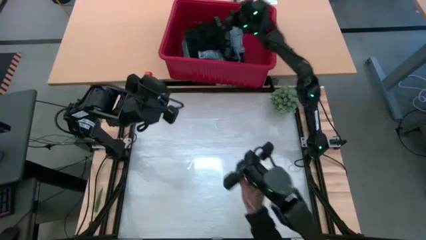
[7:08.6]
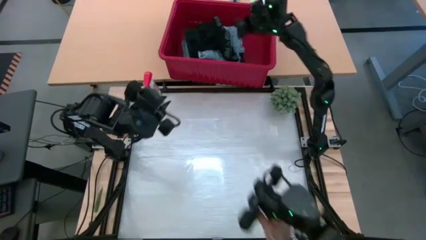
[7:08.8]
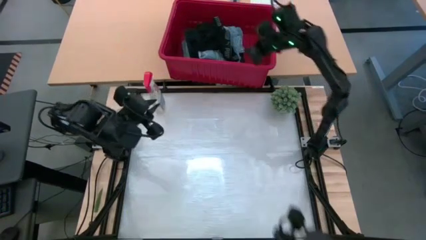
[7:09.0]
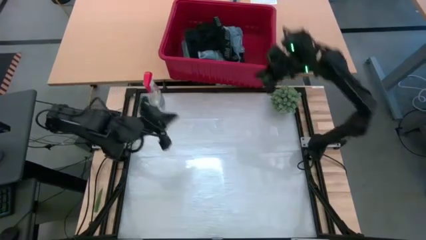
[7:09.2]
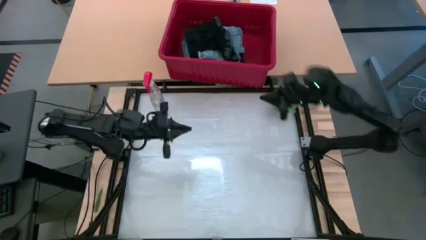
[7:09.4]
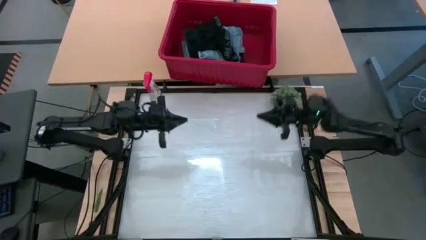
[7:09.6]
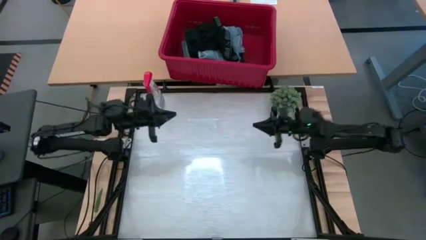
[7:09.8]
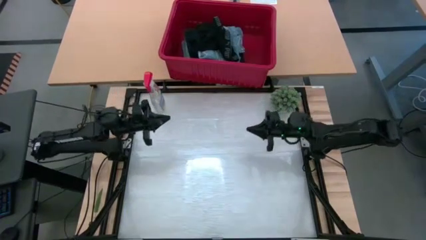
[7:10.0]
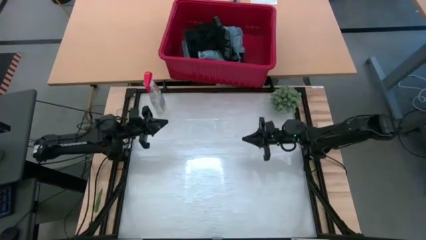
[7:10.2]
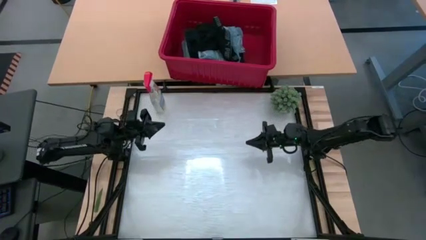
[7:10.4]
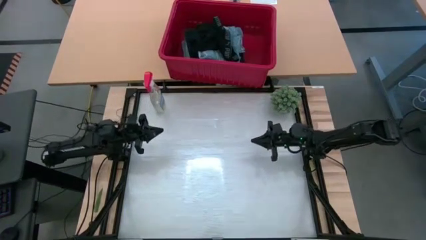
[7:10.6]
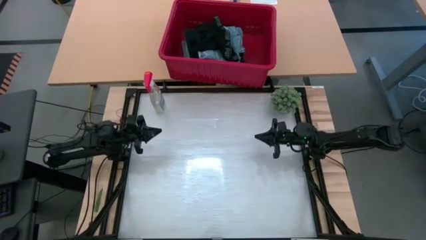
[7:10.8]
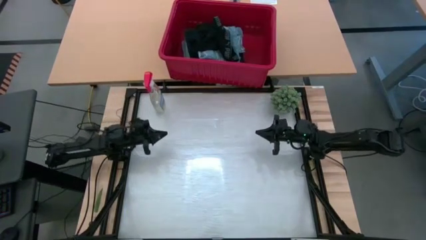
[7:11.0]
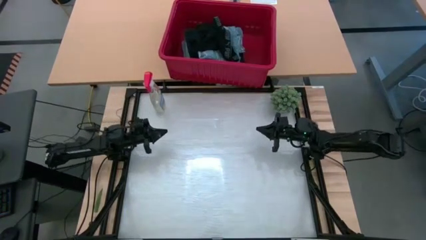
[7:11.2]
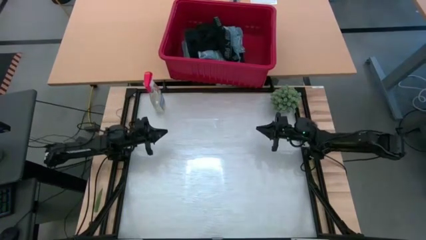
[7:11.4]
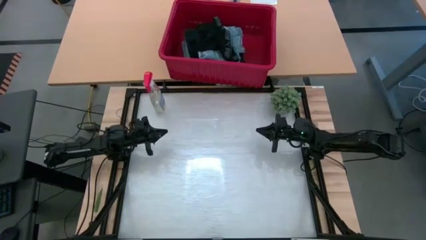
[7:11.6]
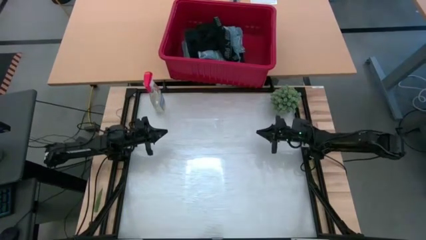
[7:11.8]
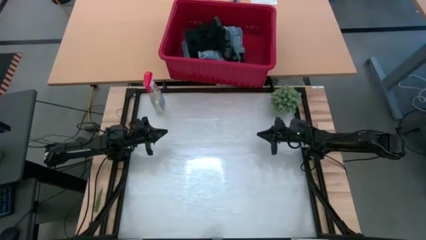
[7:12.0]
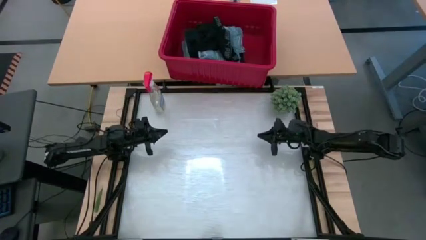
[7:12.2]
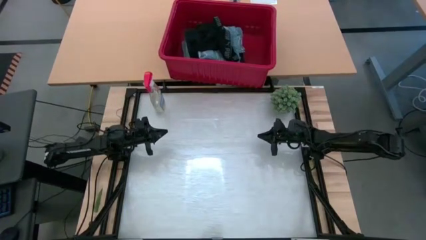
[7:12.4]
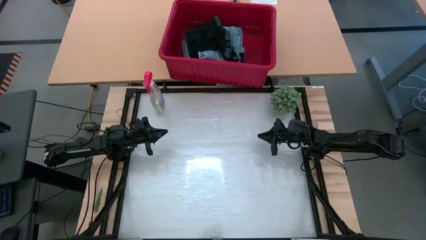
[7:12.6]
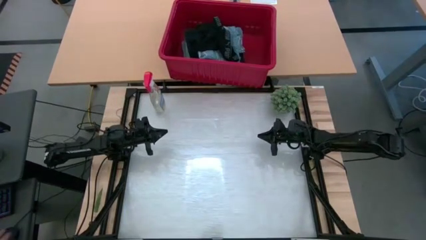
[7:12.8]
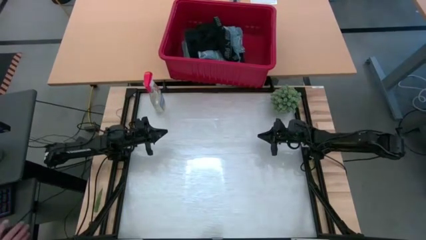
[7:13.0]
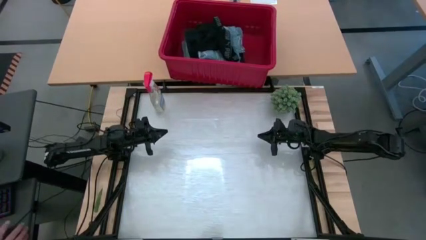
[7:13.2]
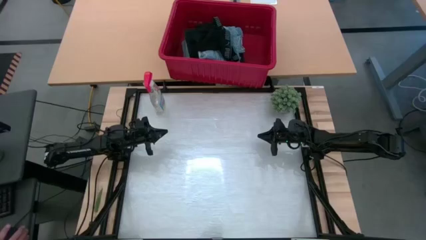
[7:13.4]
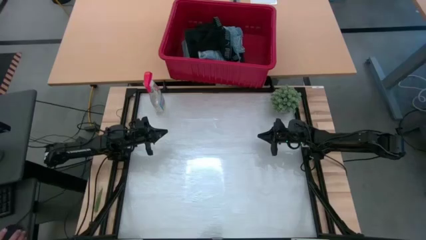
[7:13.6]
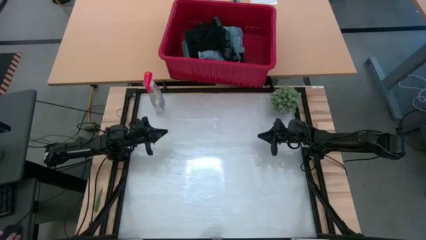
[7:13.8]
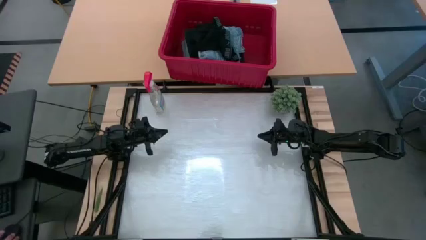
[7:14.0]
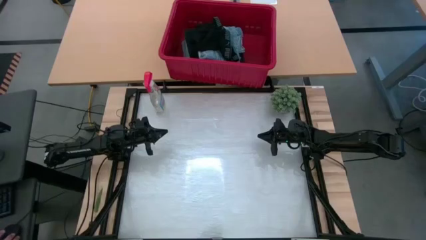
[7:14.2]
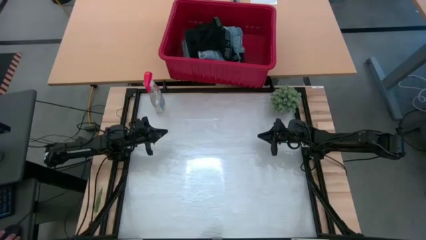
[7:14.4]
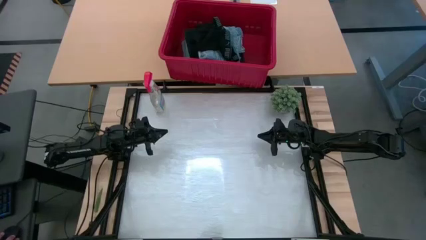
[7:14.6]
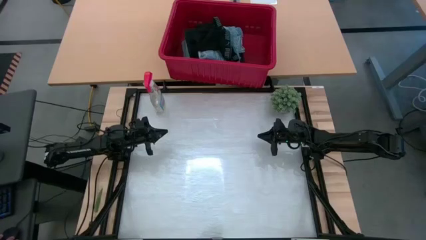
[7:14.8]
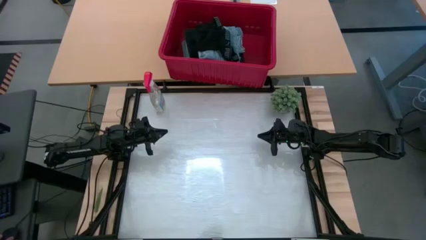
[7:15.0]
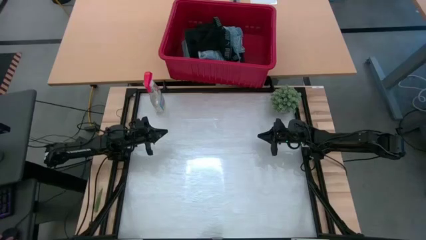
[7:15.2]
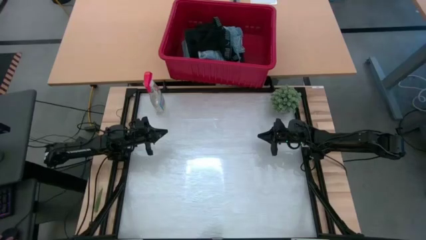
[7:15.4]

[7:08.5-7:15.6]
Task: Fold Laundry from Bin
Return to Home Position

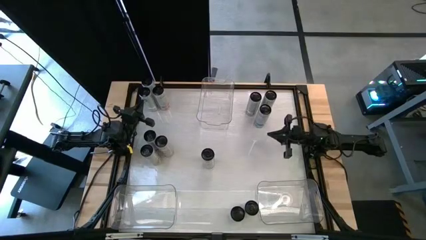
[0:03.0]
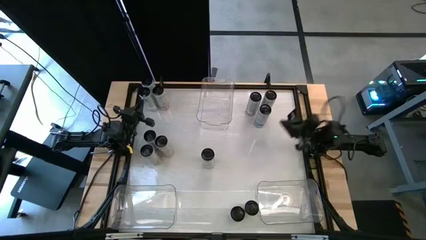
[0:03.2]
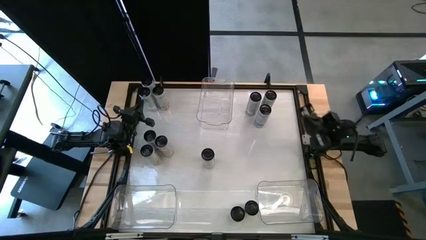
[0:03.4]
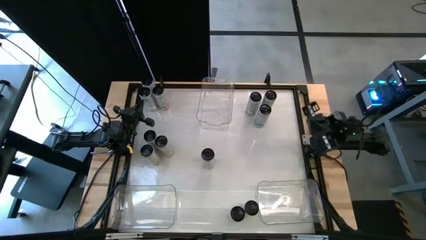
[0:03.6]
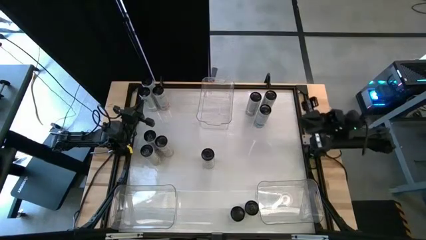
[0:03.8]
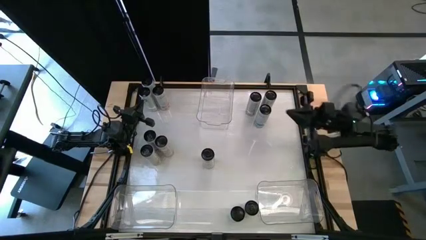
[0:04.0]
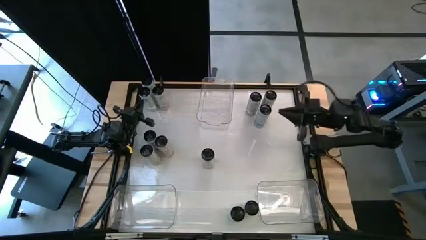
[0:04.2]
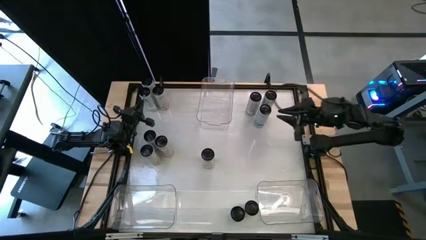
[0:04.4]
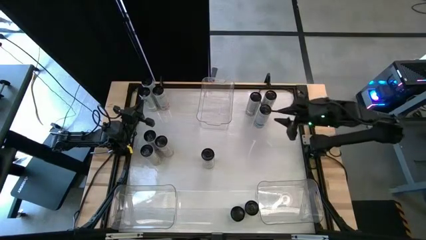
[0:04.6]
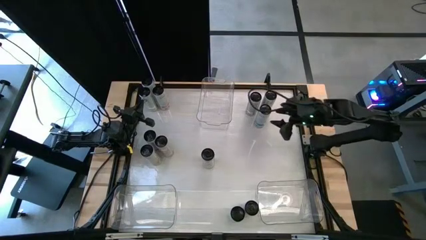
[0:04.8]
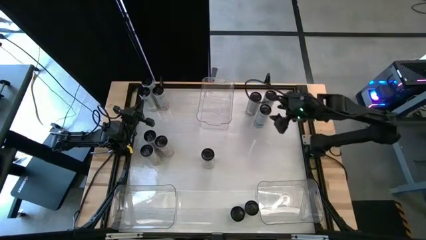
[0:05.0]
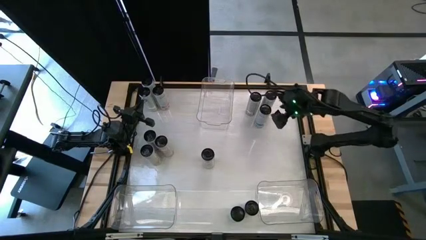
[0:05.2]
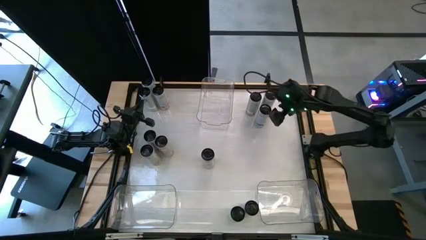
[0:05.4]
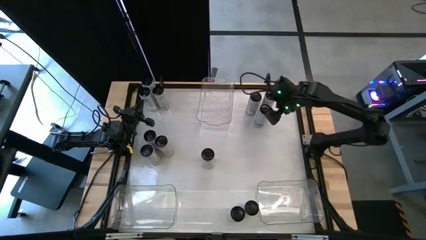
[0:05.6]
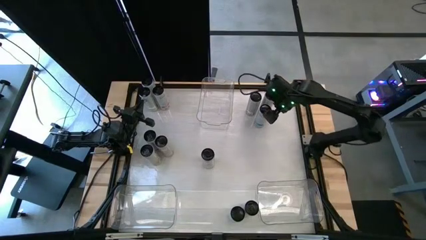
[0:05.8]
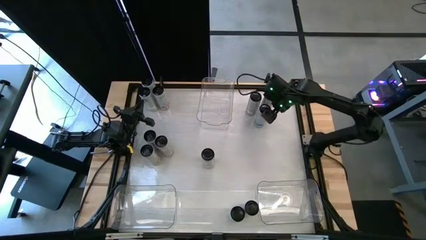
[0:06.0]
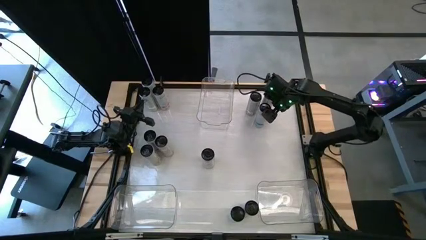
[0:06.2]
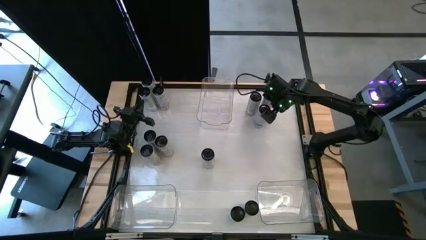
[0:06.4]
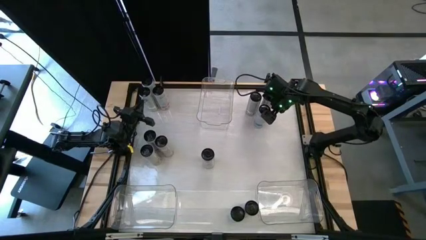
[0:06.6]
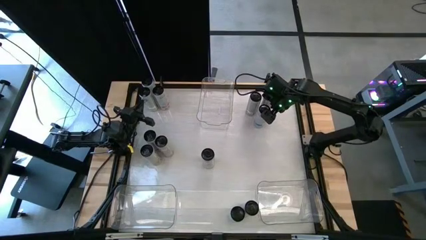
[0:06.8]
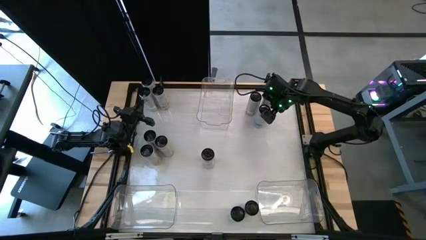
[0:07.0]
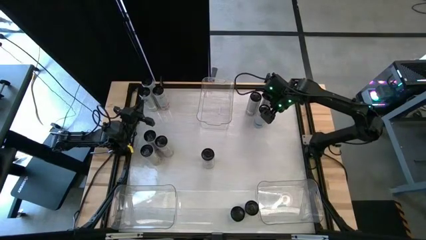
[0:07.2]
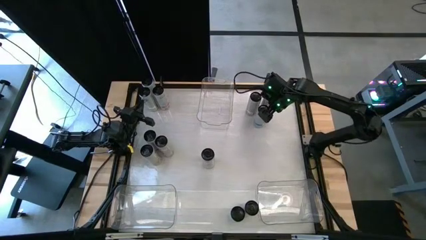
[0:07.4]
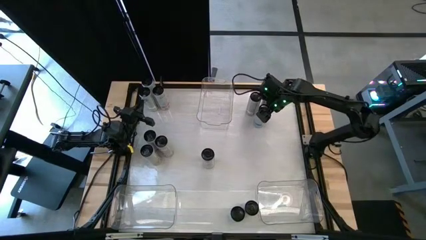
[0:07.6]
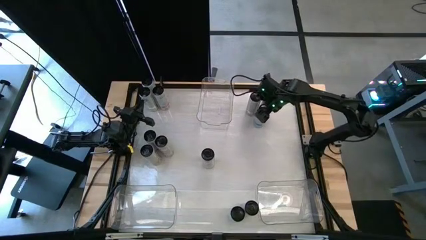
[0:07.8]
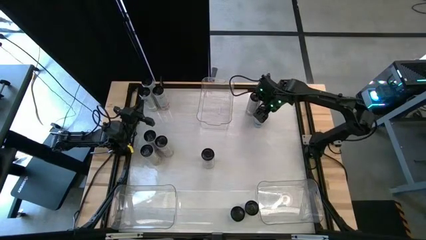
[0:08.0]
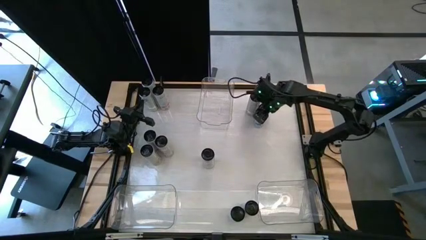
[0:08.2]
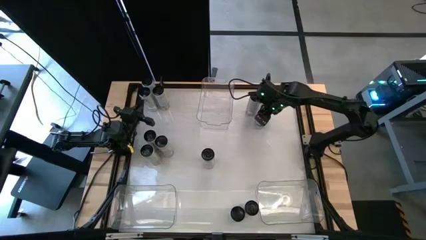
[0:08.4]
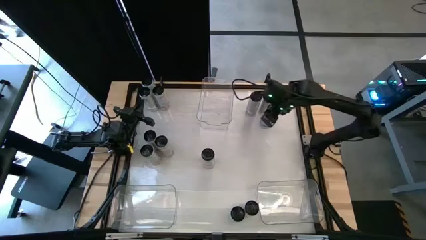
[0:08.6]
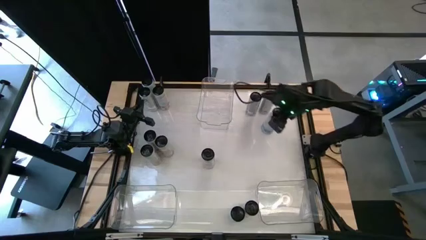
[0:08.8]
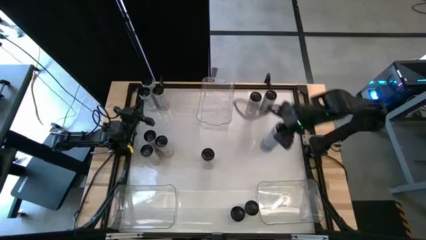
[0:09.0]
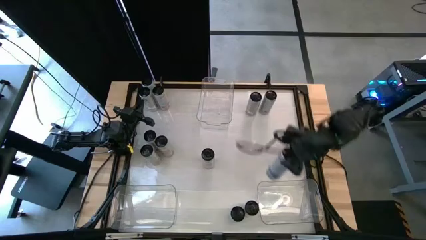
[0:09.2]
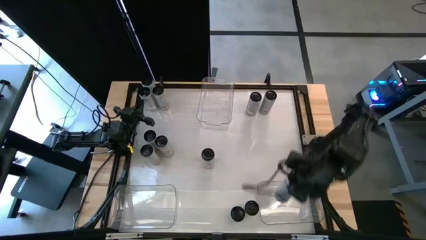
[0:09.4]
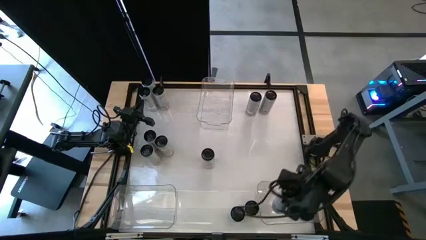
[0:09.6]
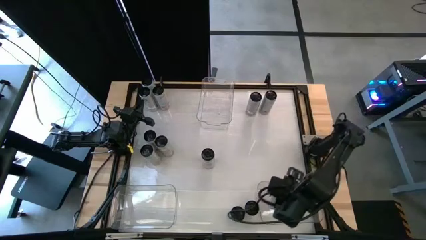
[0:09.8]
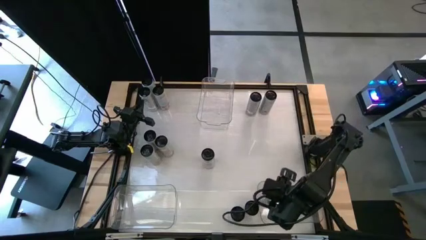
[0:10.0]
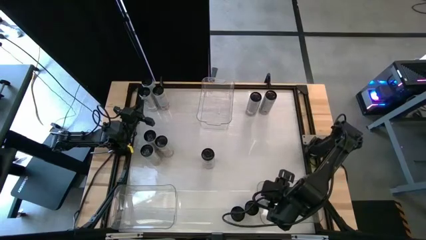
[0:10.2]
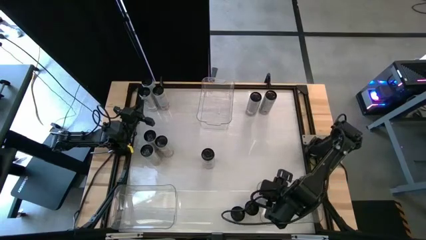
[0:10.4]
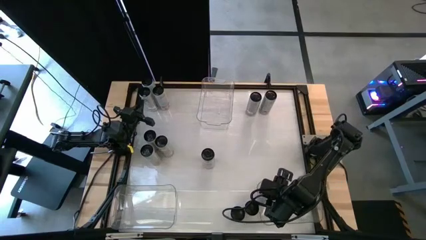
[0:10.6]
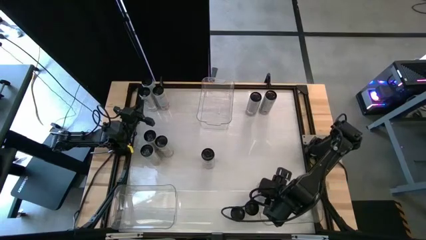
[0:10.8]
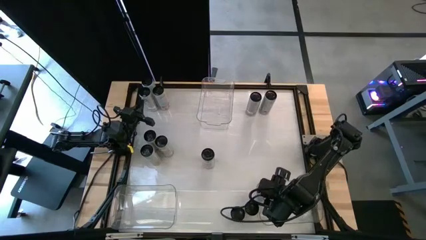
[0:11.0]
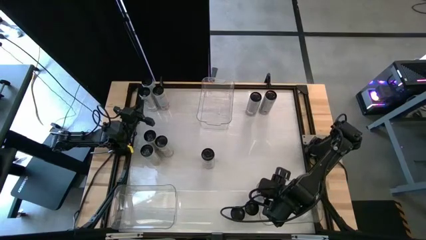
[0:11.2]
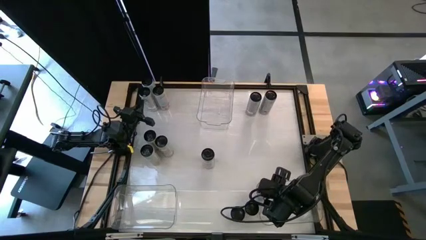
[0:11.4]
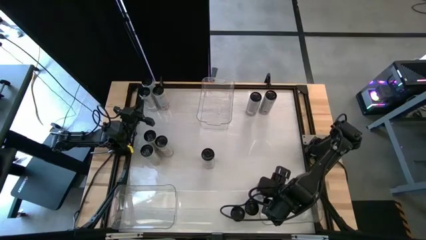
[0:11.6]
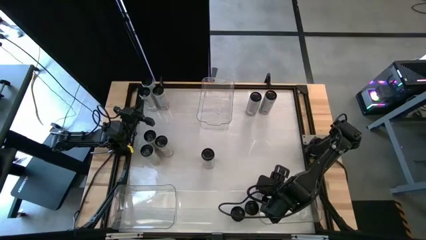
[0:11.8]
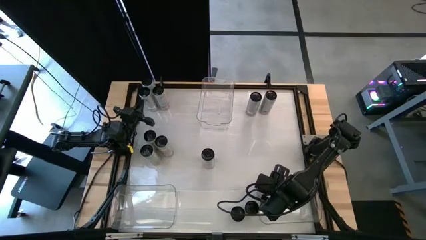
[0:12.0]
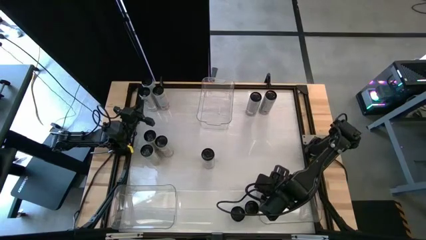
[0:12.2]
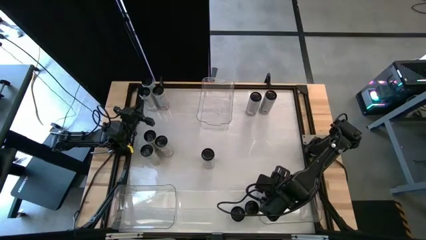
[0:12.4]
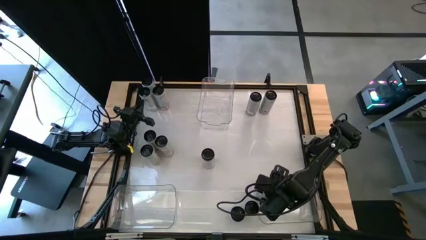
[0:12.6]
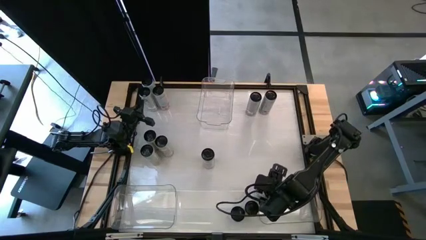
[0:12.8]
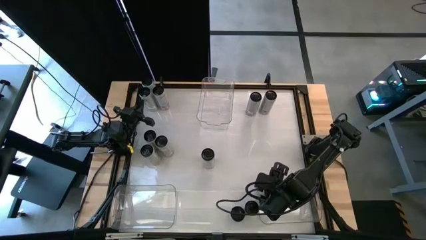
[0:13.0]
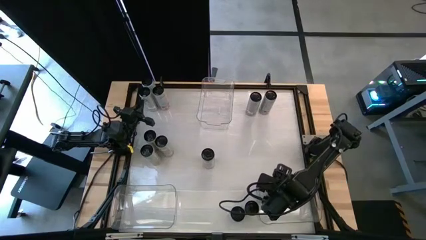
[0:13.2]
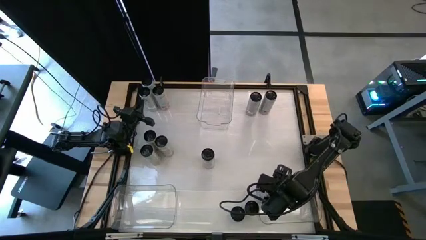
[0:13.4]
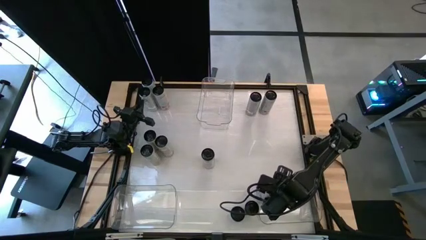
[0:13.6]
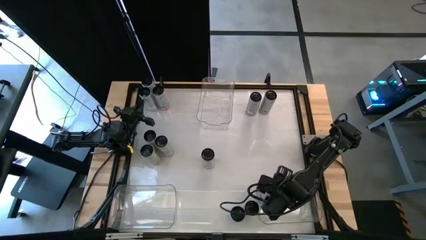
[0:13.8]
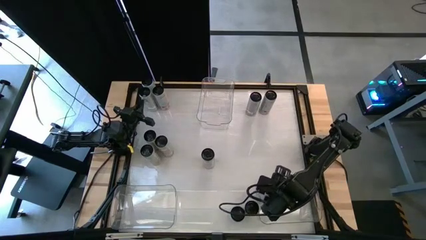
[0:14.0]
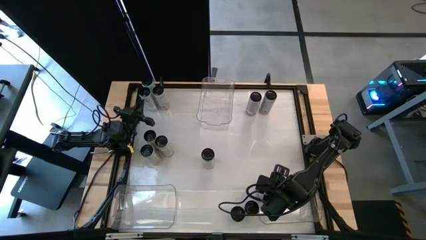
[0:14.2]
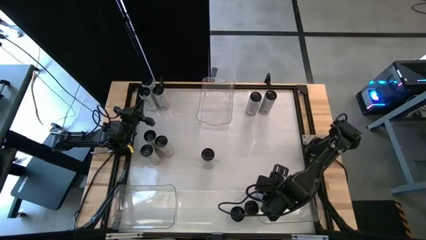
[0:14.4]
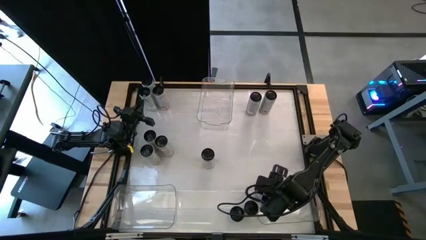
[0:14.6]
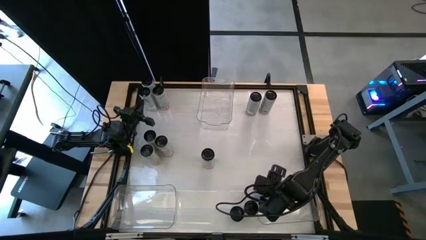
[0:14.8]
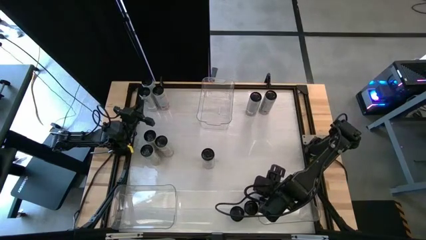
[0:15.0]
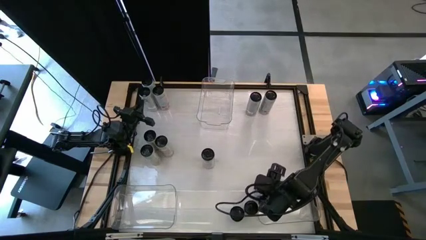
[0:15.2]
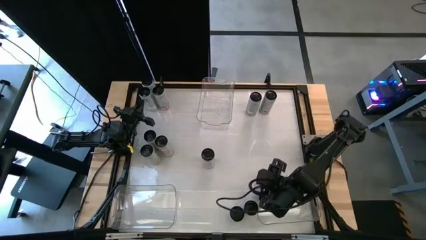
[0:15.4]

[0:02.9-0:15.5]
Task: Sort soda cans
Put the top right white blue soda can into the bottom right transparent bin
